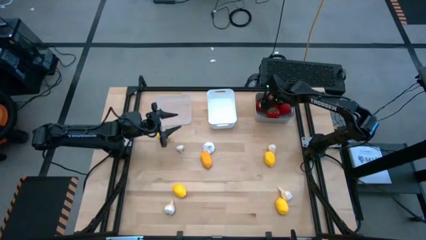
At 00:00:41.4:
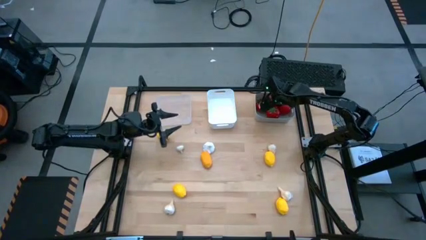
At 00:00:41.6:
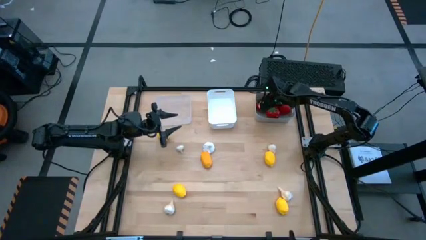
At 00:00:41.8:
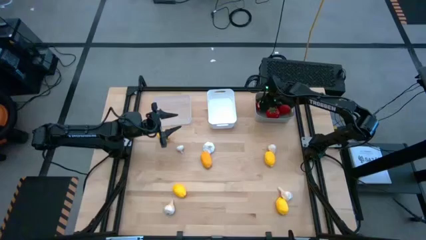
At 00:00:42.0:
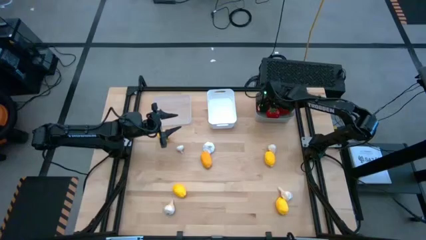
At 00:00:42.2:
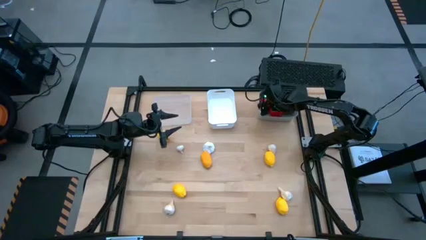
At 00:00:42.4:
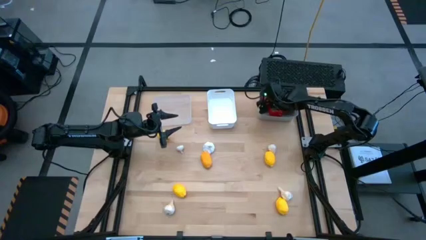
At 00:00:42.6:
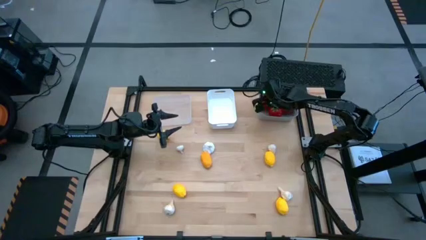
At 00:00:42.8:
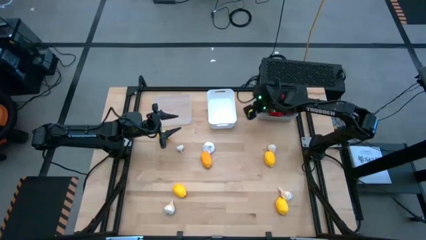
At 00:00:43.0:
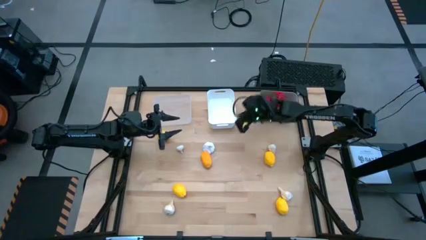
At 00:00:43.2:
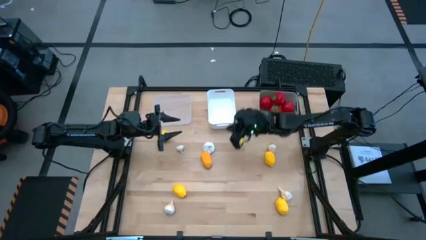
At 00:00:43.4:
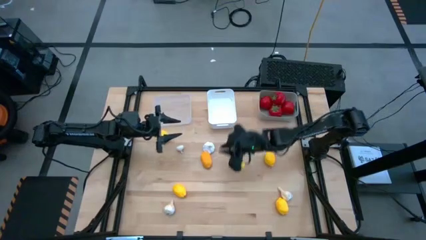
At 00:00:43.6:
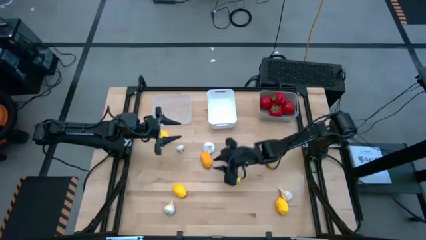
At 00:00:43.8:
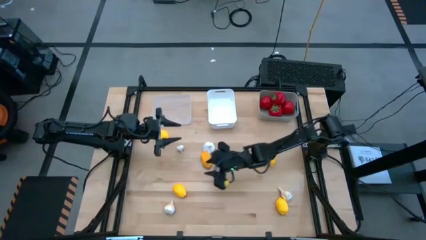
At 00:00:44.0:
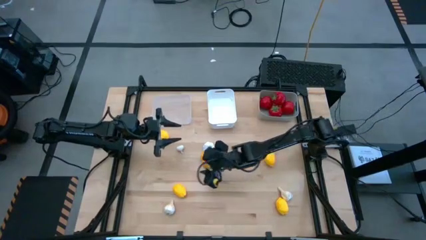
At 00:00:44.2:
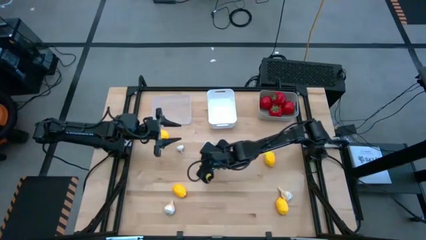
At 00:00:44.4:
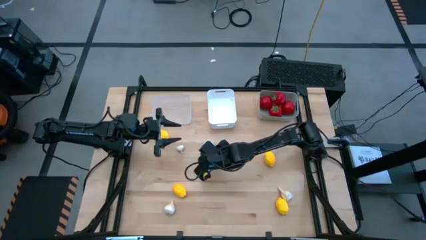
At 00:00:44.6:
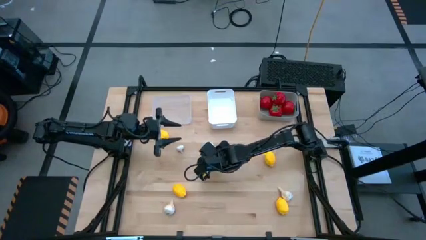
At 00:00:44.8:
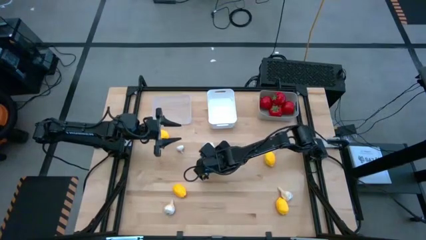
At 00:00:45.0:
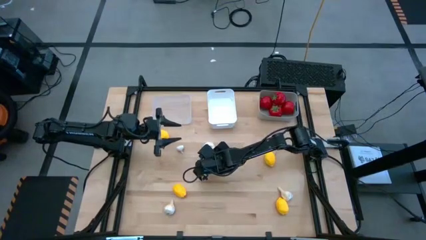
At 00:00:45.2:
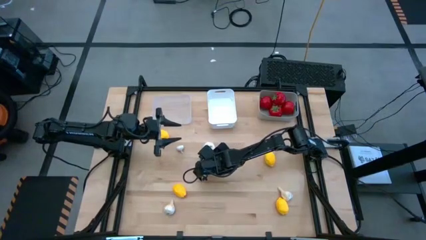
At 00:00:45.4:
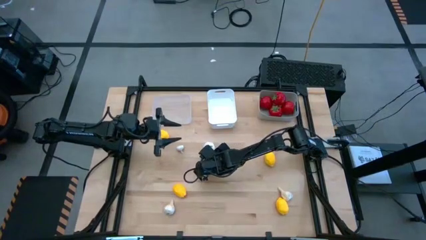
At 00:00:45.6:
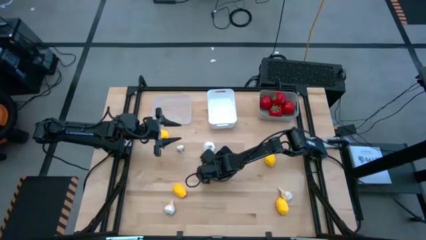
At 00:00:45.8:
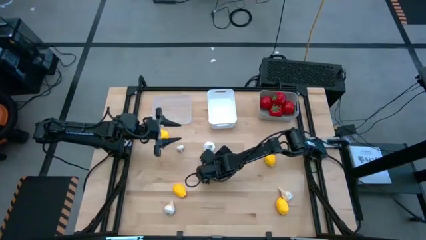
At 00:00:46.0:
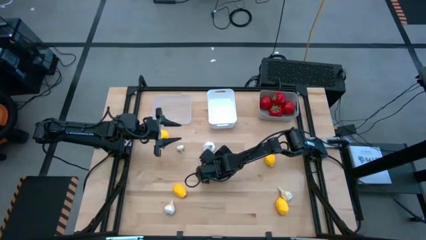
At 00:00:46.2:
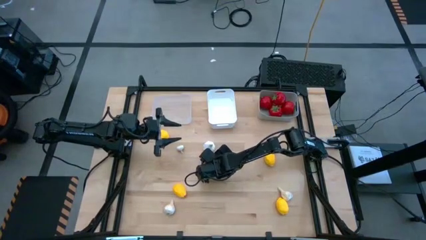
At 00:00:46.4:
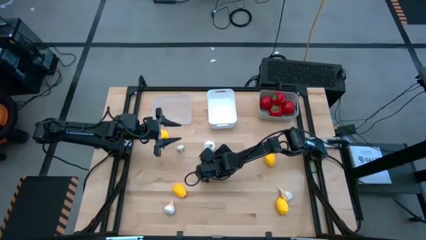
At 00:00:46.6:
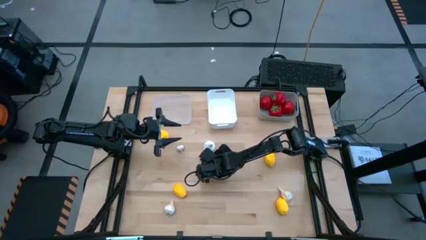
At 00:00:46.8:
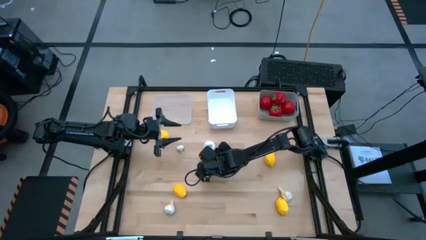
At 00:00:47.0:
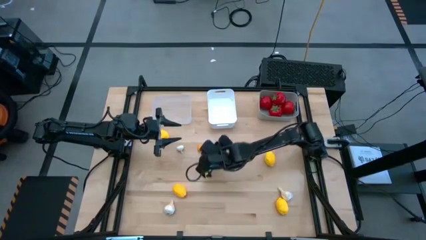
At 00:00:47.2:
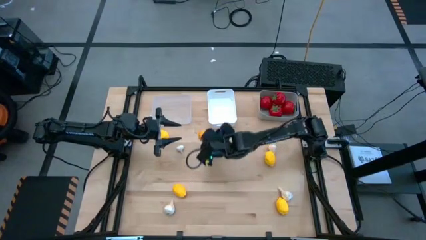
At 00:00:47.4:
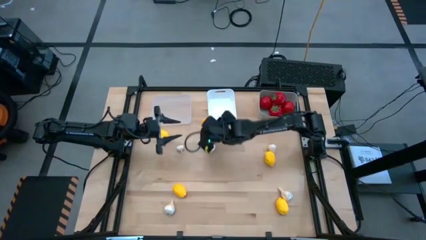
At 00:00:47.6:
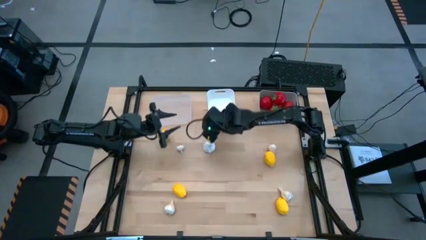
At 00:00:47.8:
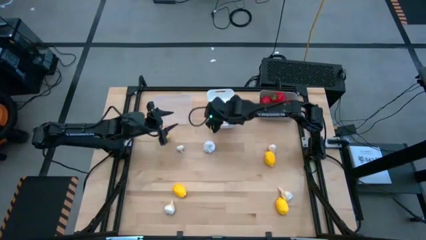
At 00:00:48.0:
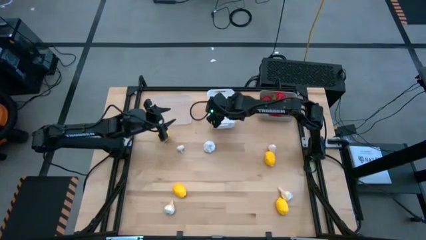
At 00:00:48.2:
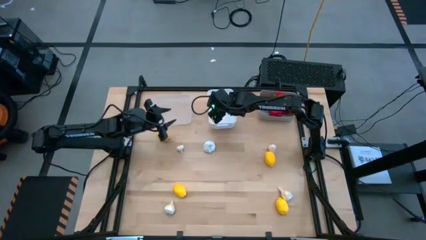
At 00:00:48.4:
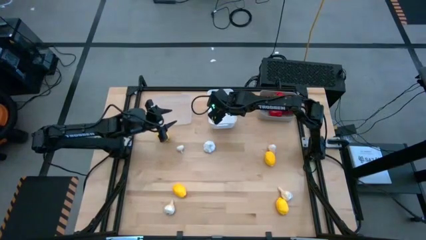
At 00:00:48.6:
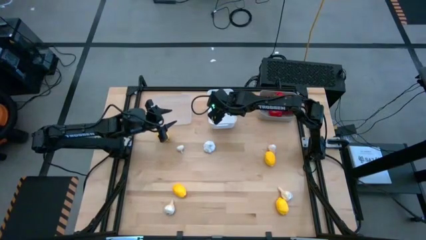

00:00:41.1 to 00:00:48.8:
Task: Sort produce into baskets
Put the yellow lemon into the white bin

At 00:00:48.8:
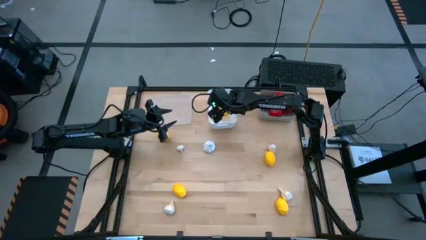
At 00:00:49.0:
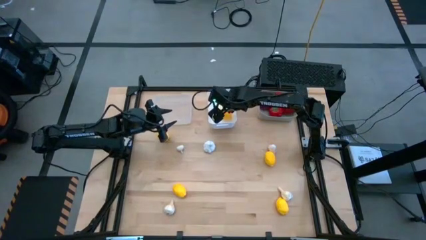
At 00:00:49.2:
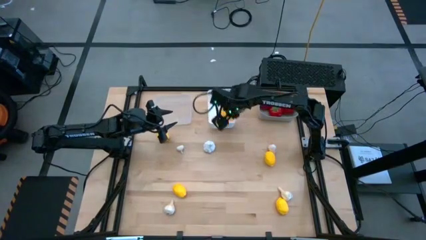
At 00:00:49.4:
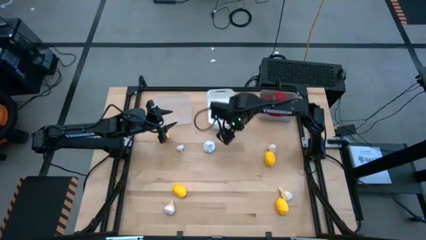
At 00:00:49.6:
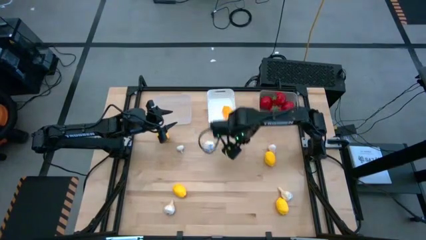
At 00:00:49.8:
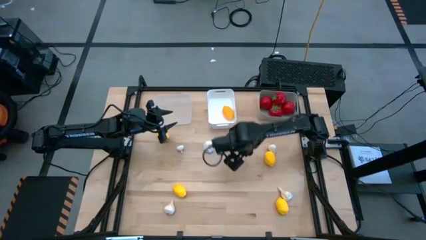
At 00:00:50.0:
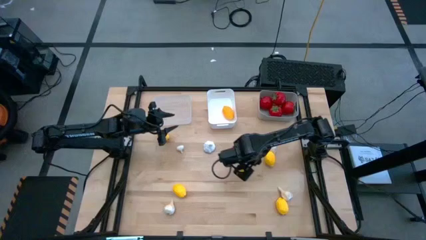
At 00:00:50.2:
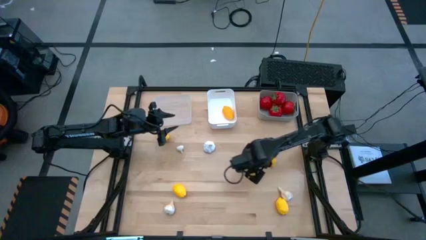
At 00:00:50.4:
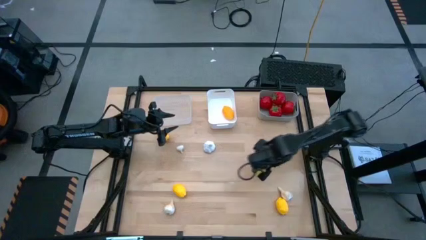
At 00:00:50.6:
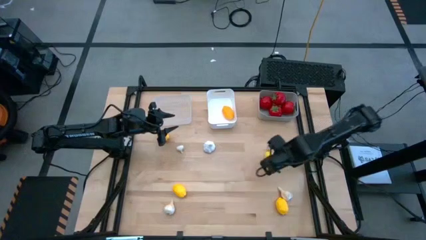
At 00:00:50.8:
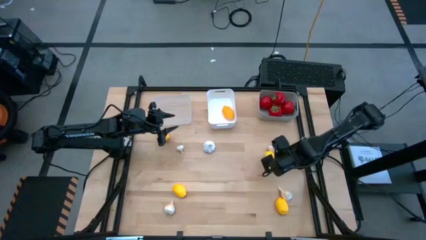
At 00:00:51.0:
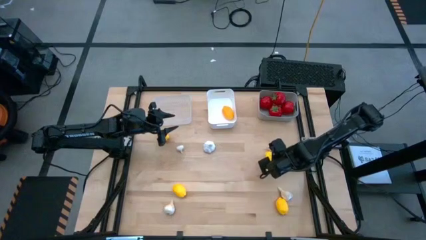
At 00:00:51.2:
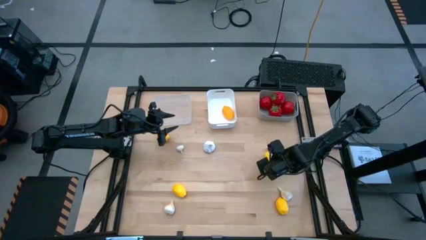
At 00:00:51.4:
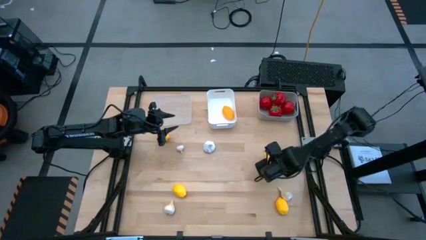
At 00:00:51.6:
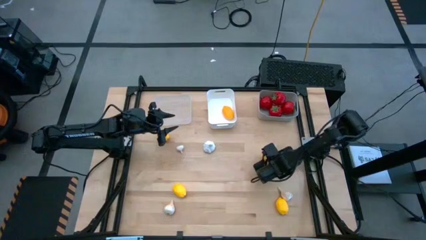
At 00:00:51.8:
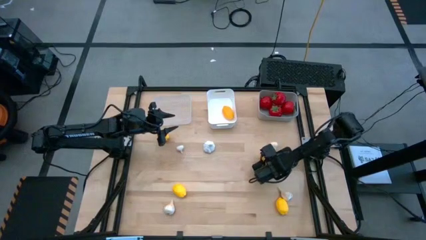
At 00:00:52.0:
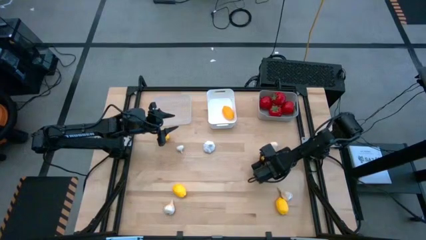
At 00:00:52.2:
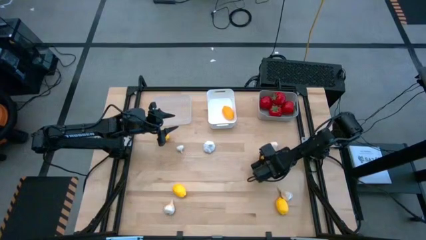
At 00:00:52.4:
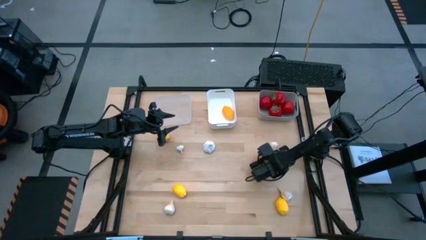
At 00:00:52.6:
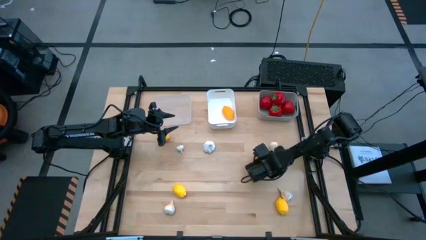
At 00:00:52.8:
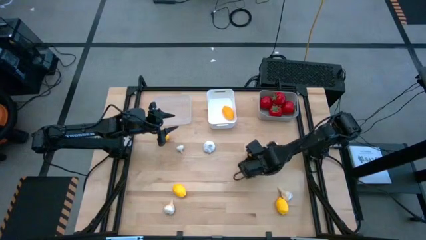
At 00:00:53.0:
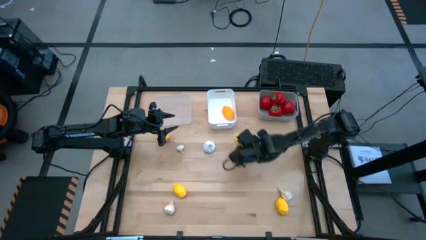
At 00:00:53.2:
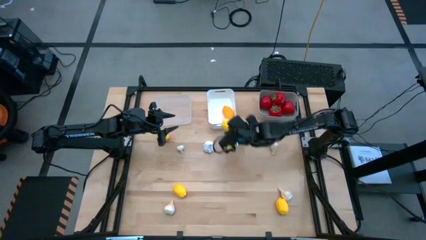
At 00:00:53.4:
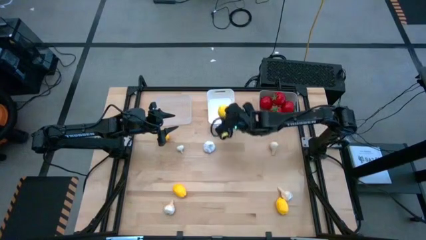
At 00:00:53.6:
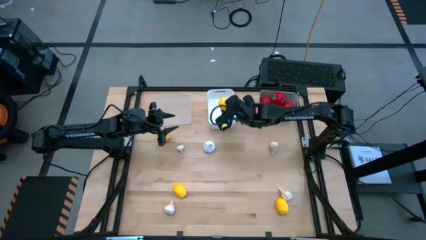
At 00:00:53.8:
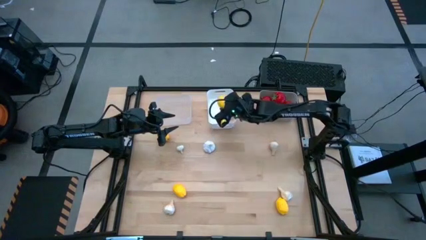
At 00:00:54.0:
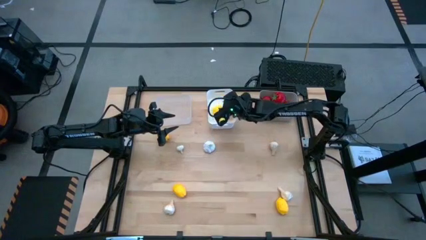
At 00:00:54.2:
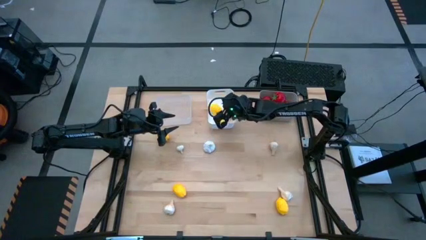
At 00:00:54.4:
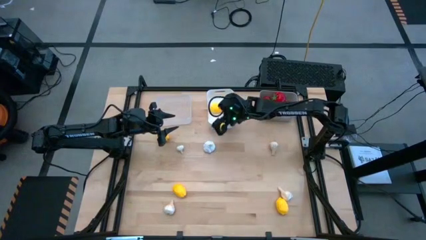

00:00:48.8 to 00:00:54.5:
Put the yellow lemon into the white bin

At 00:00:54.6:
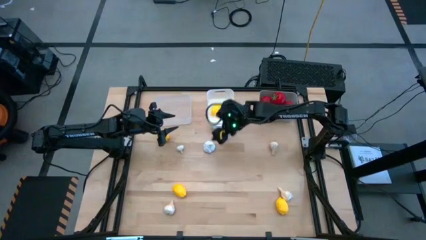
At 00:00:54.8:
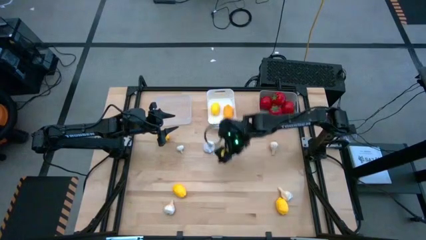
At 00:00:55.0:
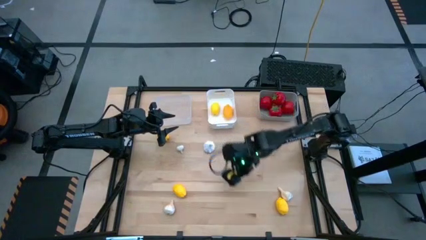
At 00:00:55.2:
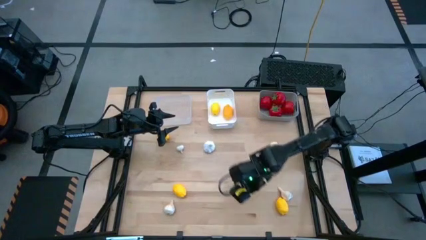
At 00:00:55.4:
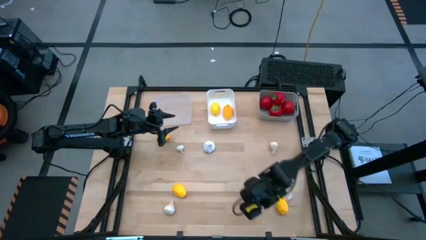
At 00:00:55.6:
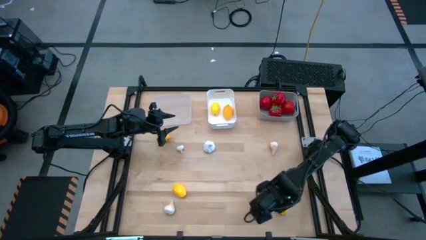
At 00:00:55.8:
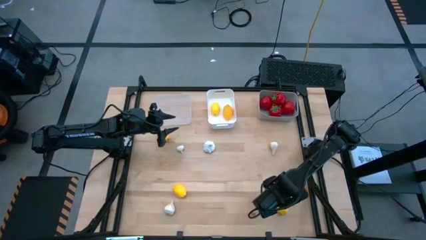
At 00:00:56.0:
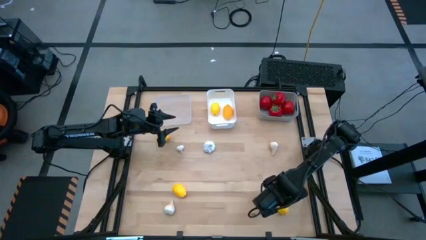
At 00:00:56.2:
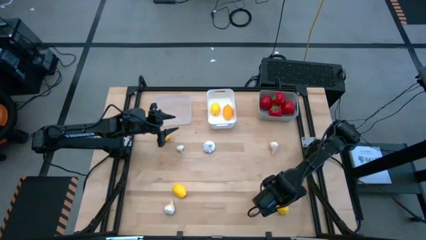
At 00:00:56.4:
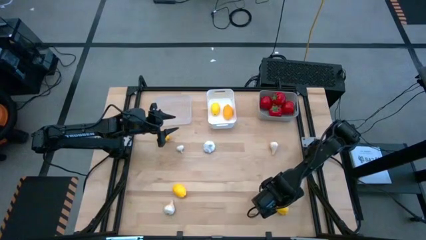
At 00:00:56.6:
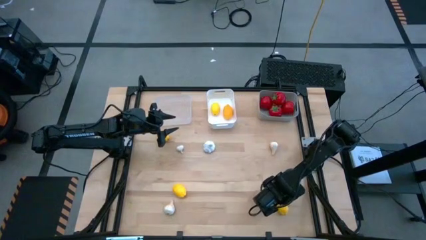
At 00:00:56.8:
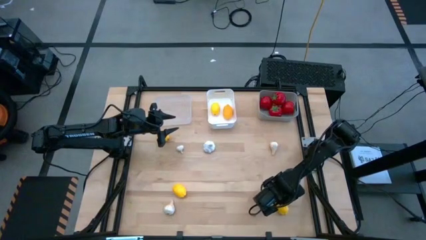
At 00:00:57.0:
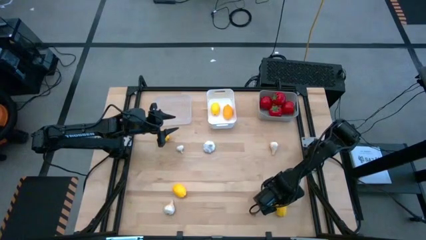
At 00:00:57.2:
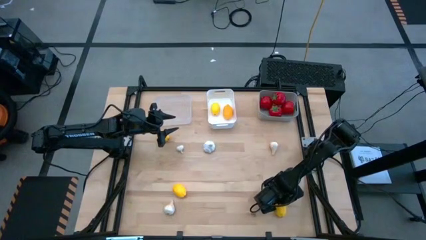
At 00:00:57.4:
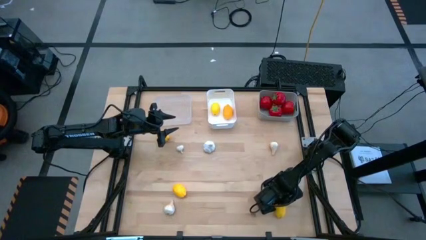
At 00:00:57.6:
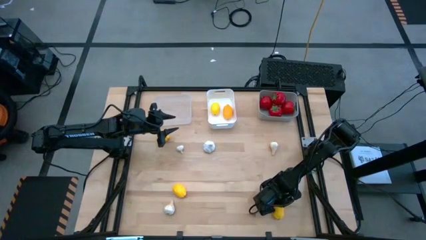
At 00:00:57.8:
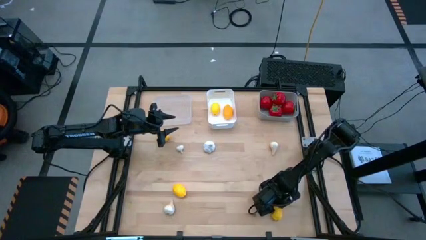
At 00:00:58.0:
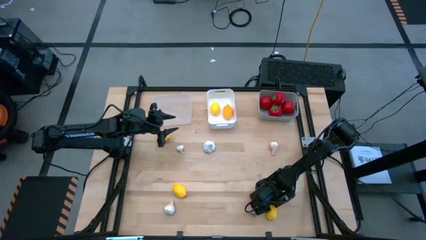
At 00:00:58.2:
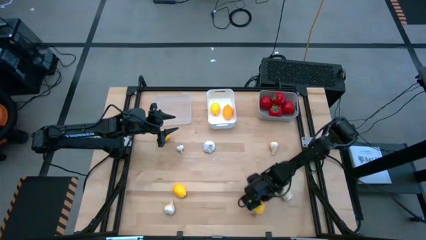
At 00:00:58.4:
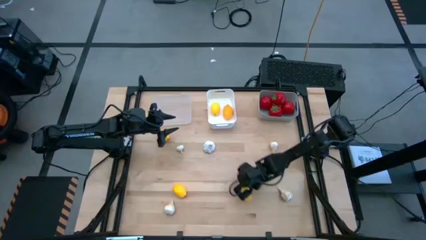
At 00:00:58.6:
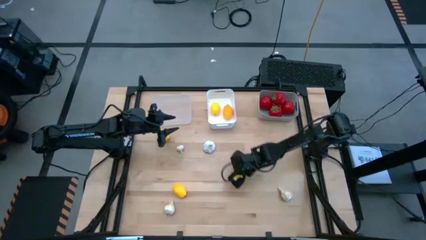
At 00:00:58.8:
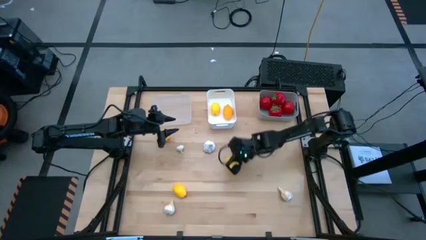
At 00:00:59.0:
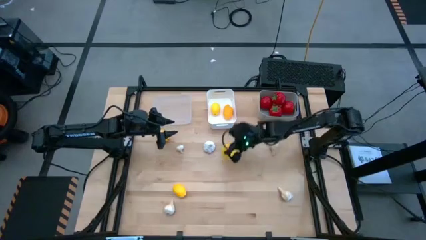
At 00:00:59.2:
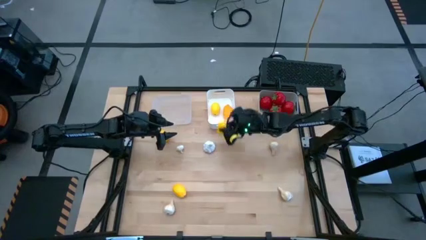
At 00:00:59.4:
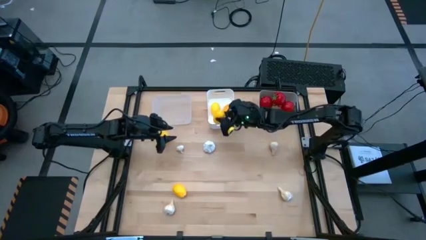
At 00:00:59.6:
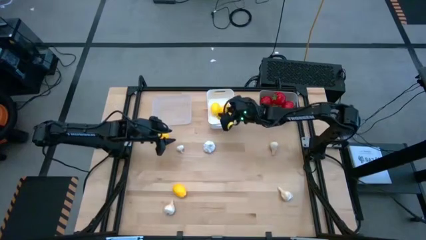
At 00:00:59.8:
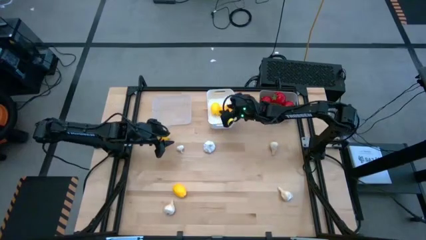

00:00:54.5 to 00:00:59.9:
Put the yellow lemon into the white bin
